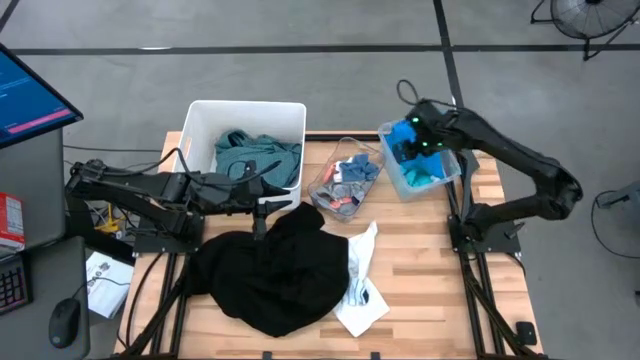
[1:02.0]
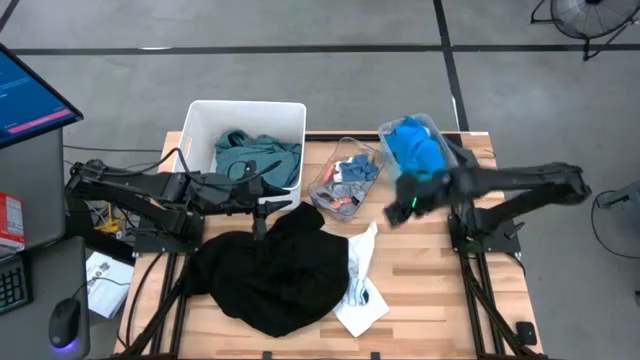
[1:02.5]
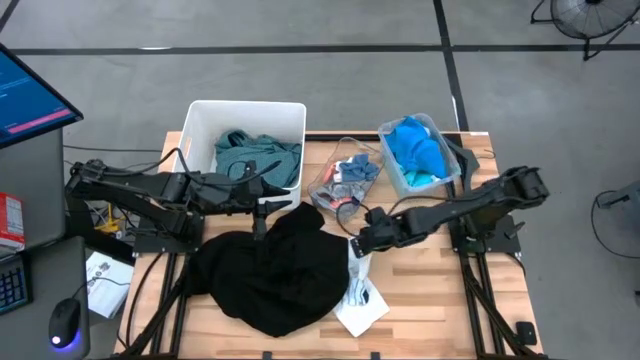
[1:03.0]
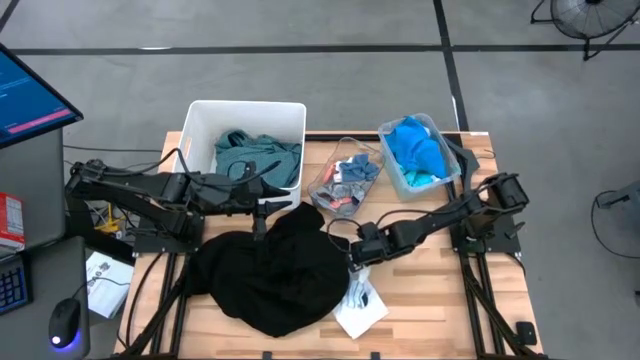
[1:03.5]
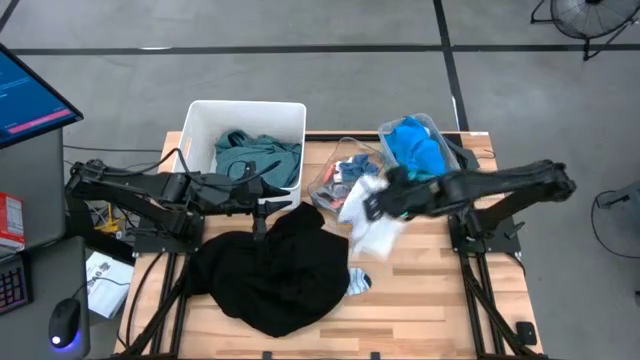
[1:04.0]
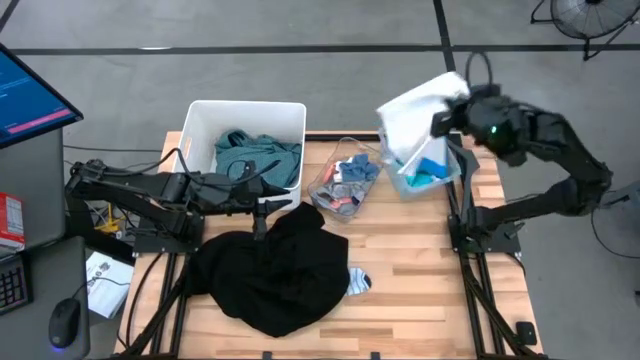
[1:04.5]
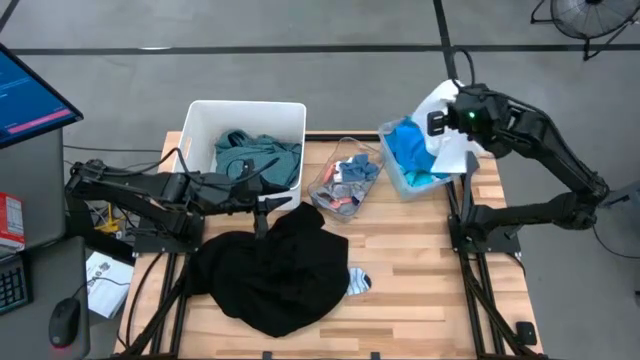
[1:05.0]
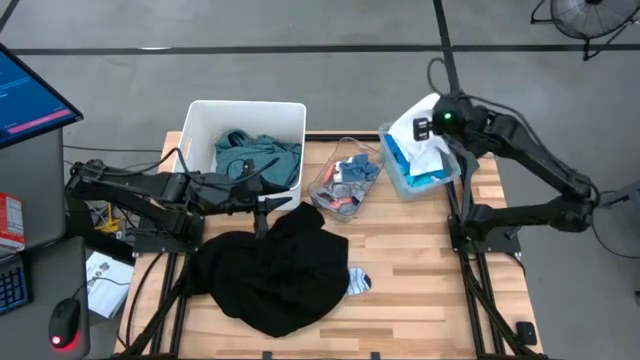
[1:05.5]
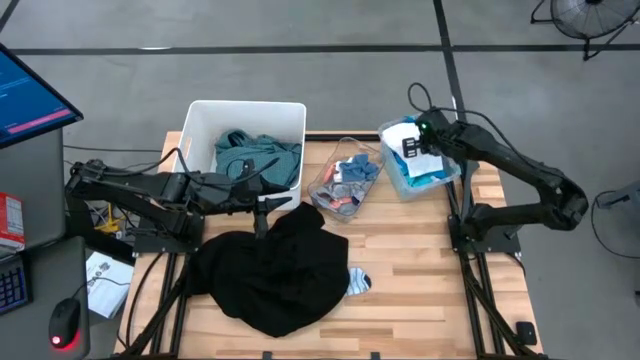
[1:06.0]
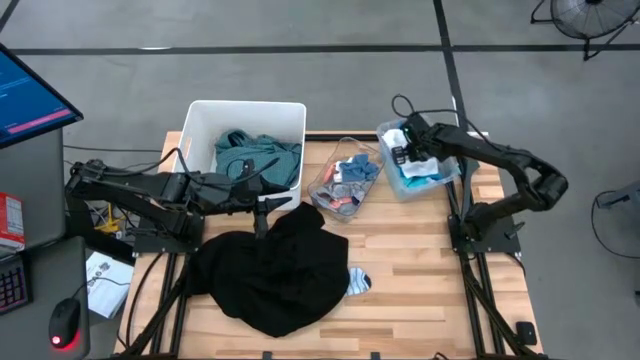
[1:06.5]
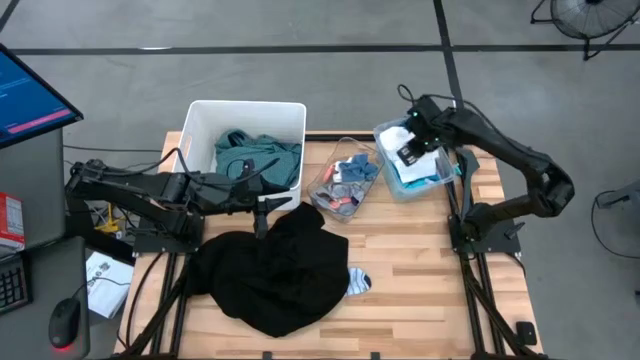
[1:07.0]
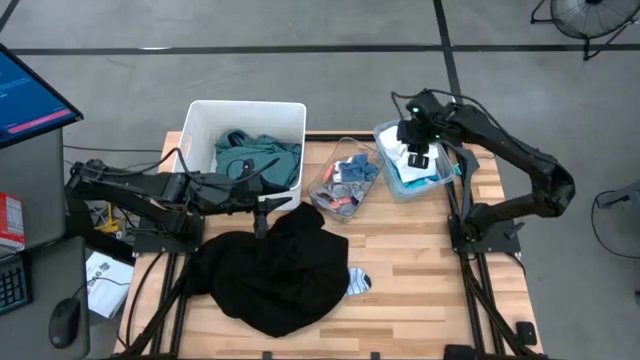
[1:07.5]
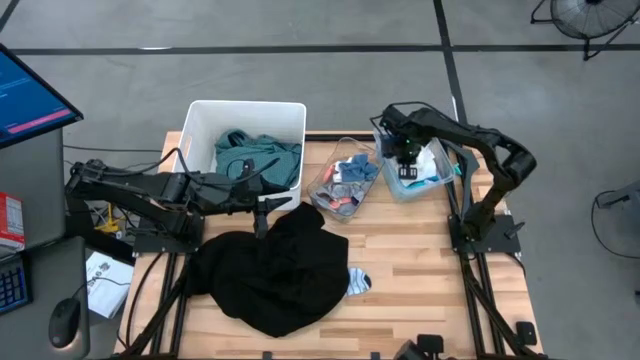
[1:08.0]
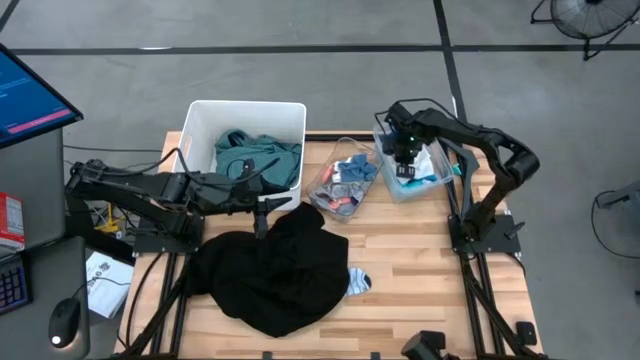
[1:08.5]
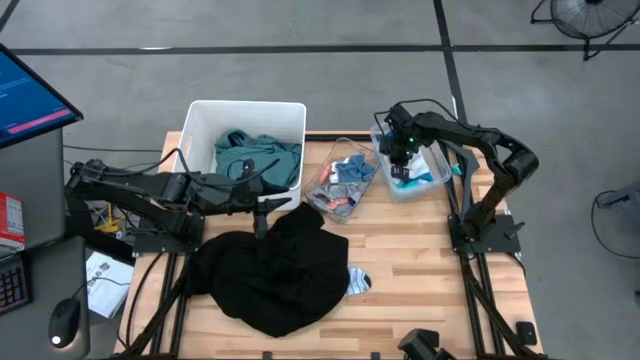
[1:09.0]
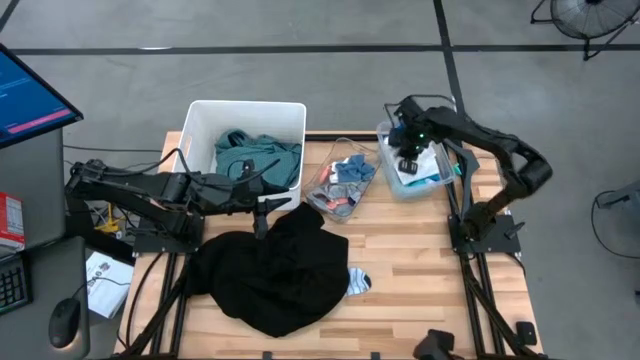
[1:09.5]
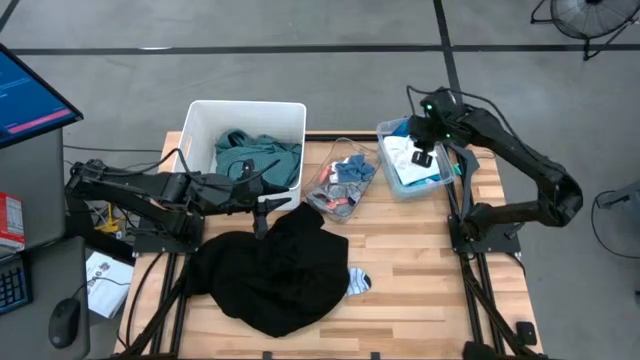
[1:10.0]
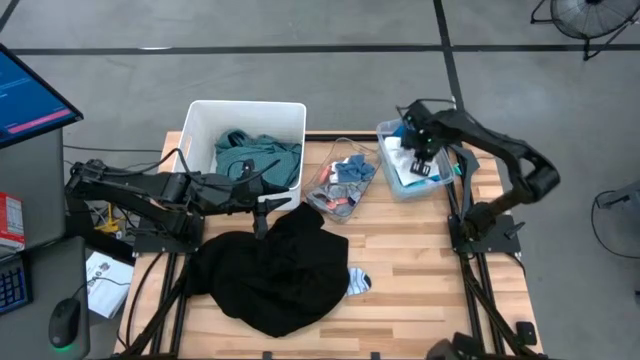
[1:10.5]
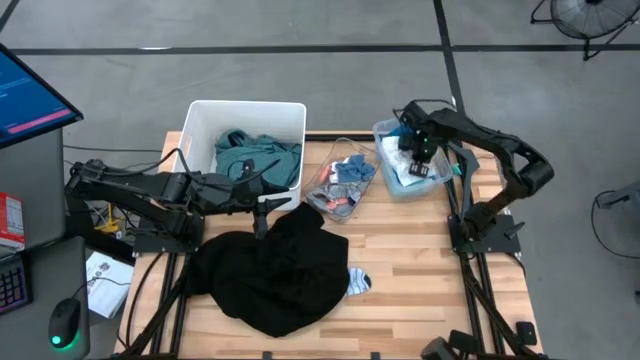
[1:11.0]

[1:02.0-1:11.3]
Task: Pick & Place Cloths
Put the white shorts into the right transparent bin

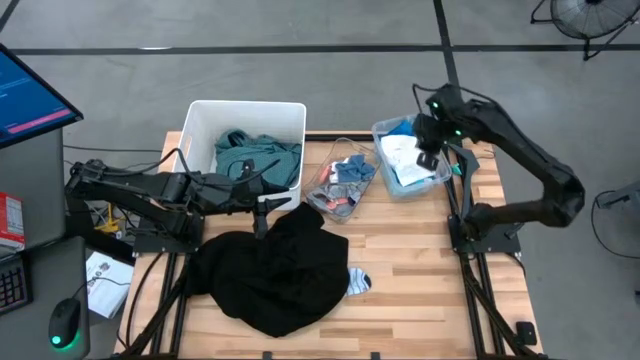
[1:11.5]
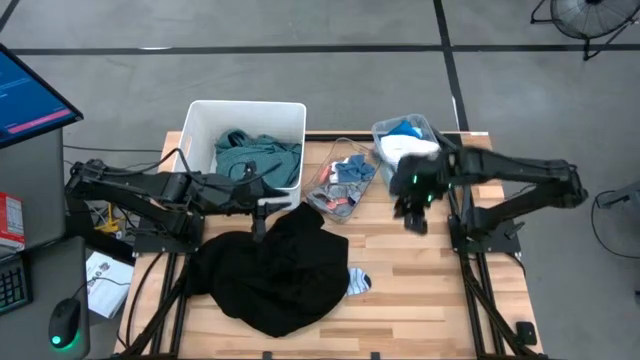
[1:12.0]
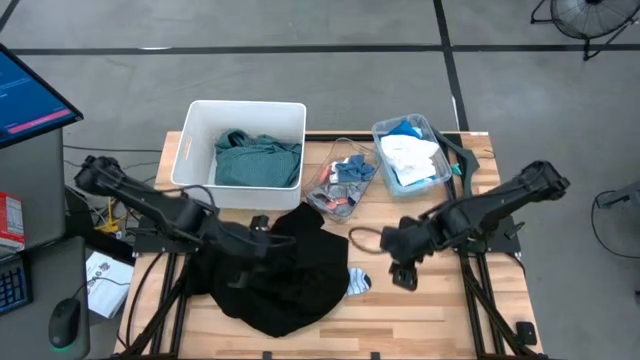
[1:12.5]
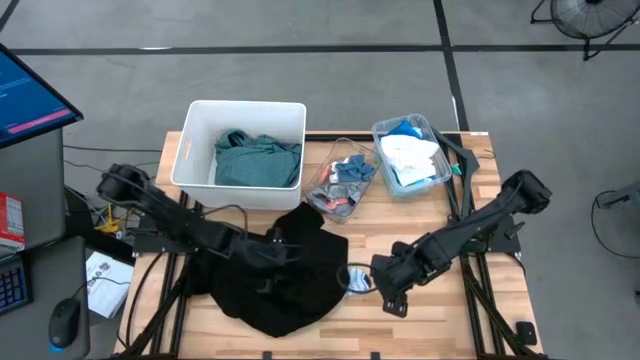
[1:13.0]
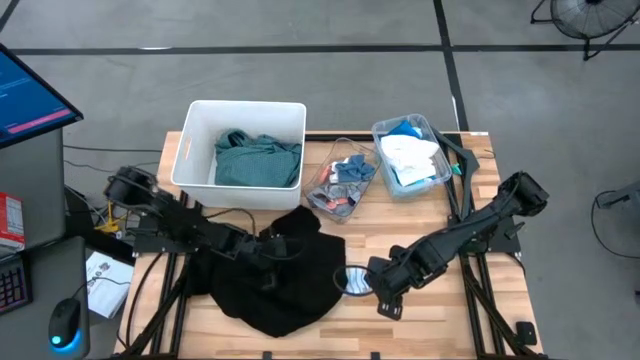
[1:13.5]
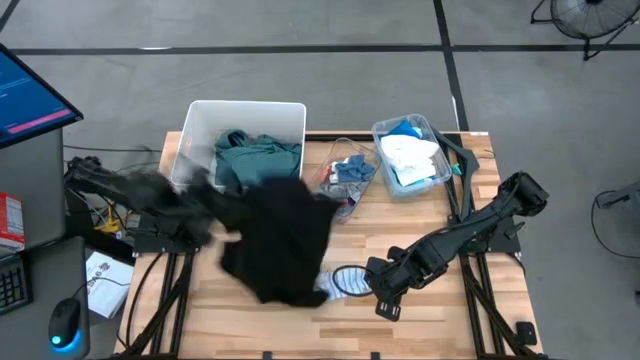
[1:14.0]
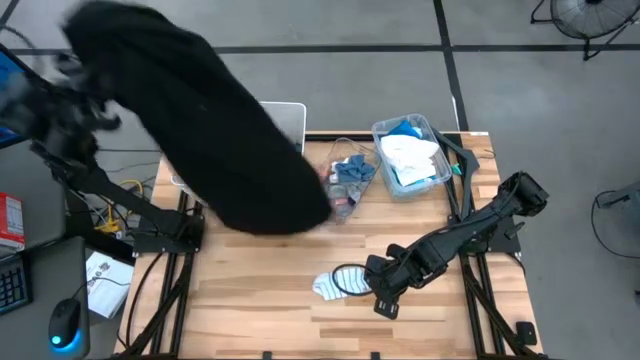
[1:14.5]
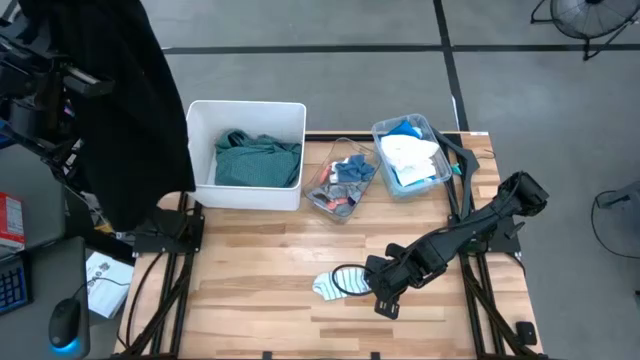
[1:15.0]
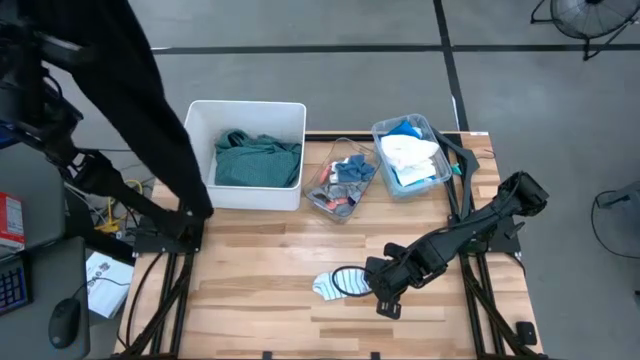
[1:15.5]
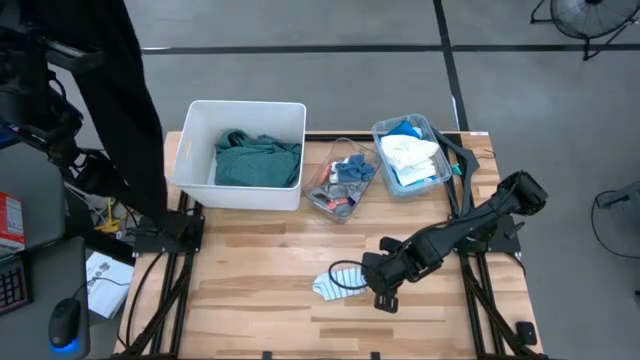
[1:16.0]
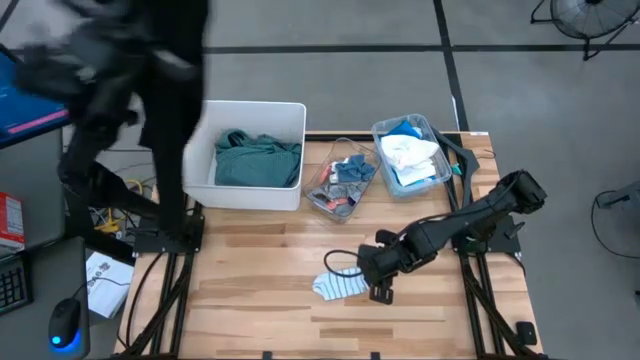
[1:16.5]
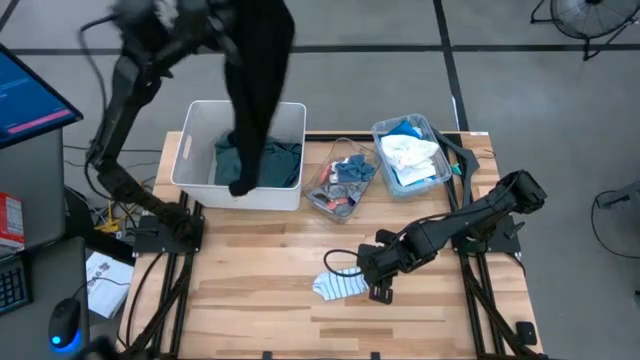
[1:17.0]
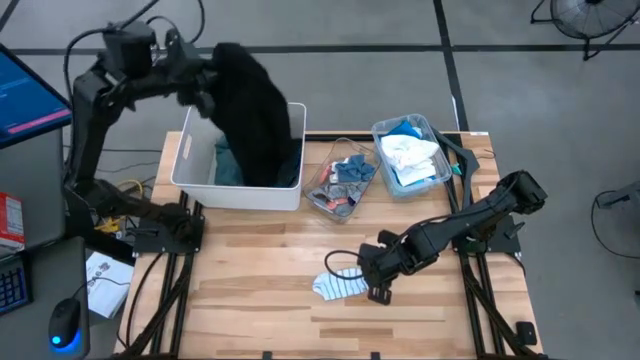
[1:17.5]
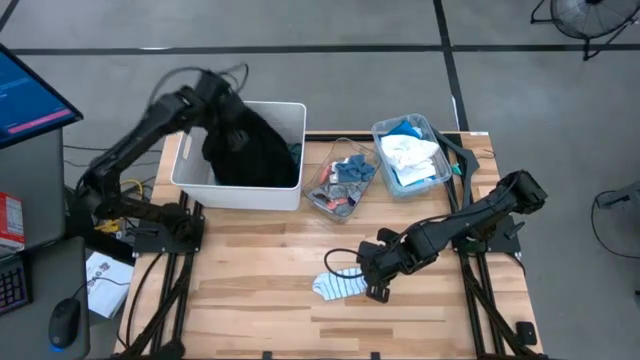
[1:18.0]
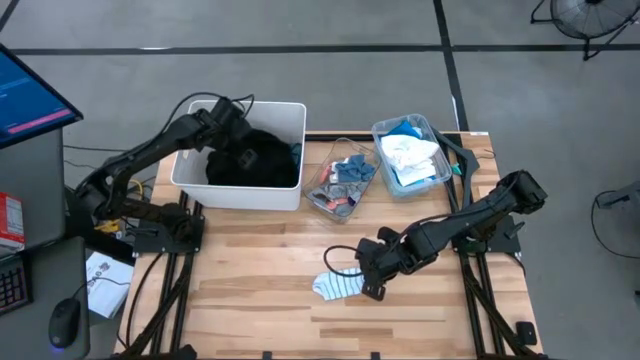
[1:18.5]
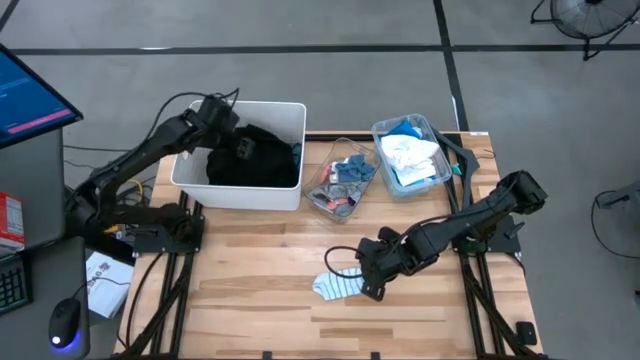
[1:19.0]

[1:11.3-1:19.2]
Put the black jacket into the white bin

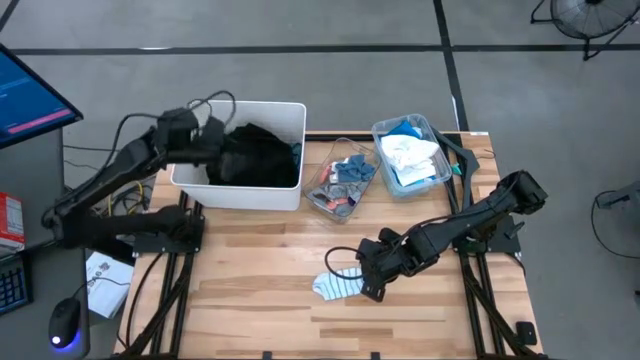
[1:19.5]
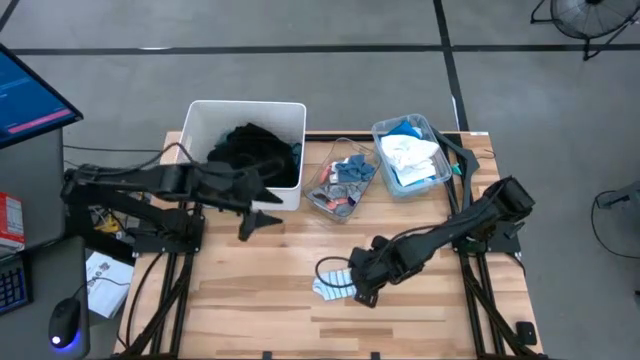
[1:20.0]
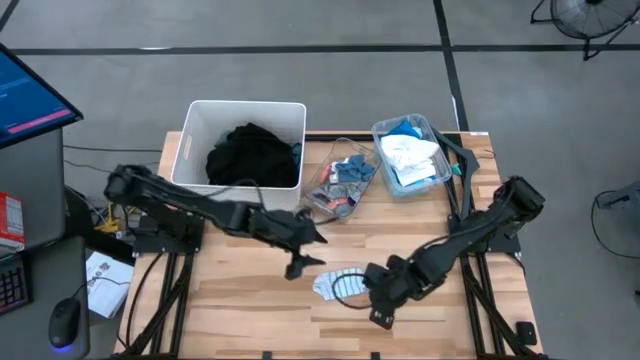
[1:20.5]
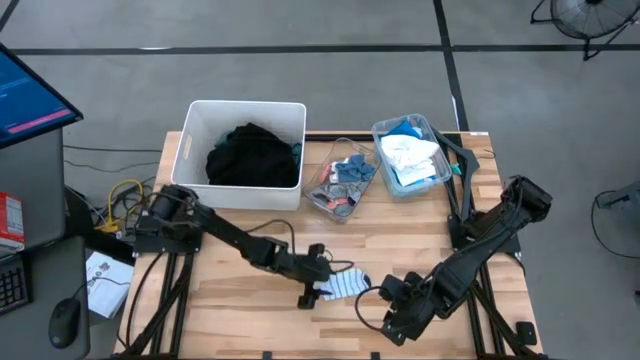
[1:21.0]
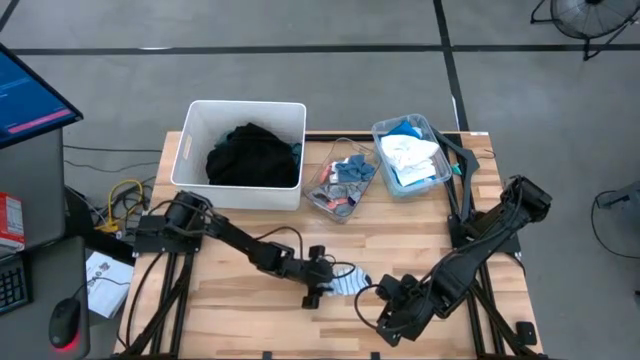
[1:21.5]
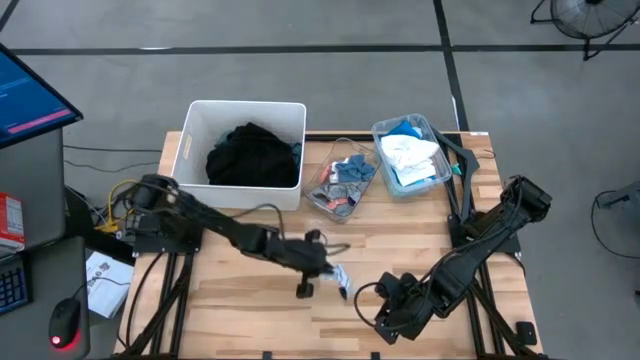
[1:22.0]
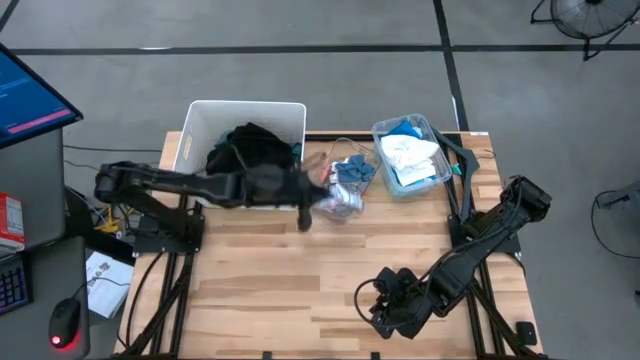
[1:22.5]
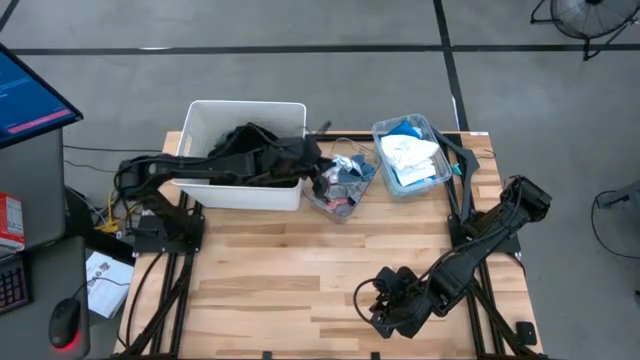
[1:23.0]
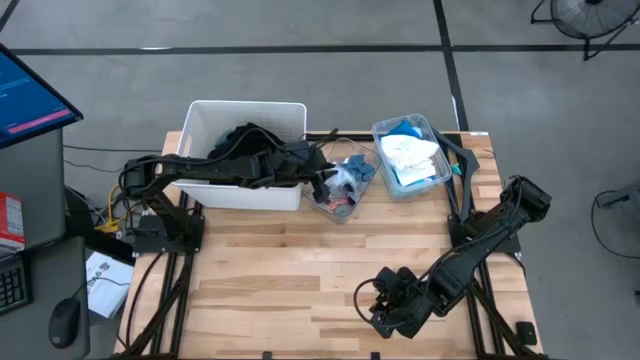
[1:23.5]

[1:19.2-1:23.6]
Put the white and blue sock into the middle transparent bin
